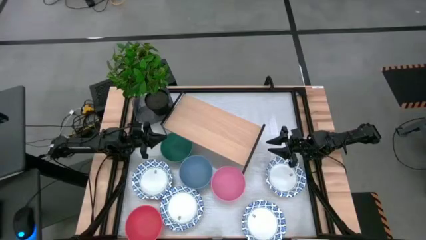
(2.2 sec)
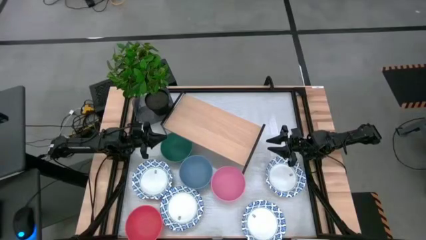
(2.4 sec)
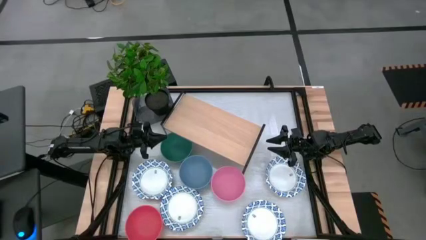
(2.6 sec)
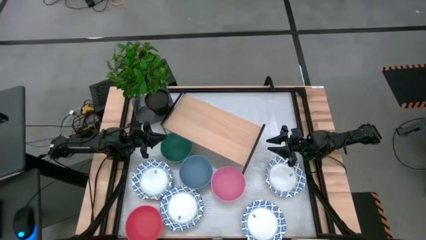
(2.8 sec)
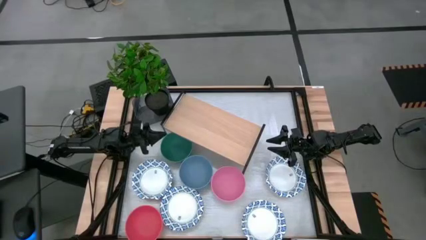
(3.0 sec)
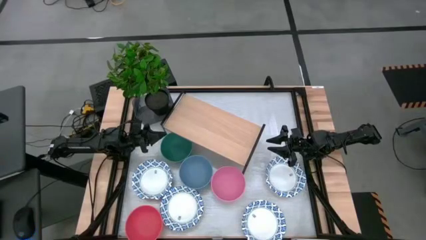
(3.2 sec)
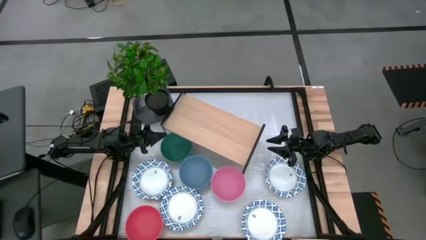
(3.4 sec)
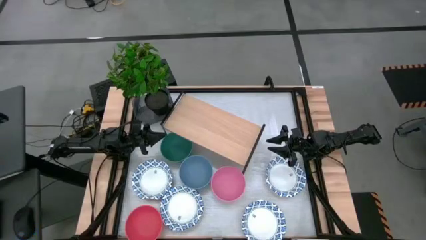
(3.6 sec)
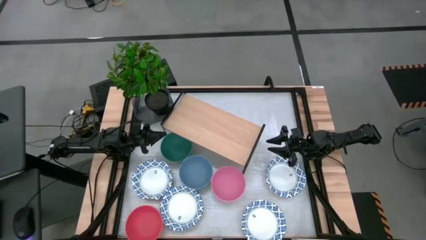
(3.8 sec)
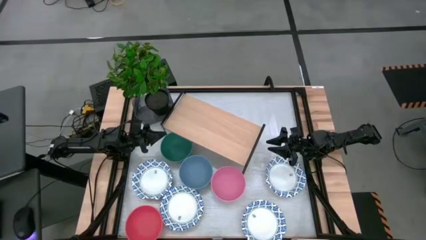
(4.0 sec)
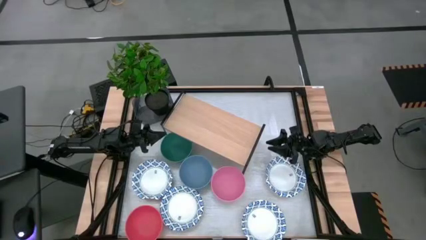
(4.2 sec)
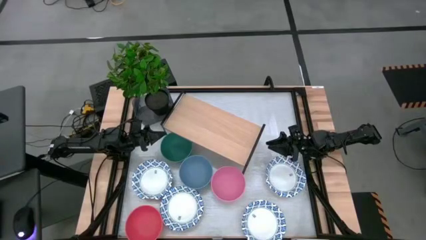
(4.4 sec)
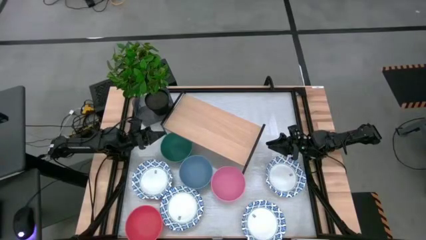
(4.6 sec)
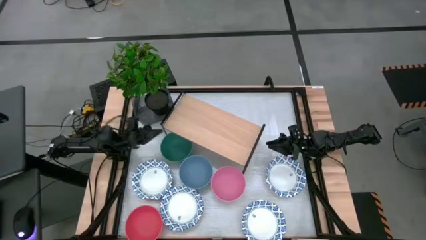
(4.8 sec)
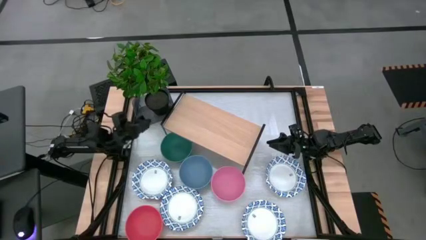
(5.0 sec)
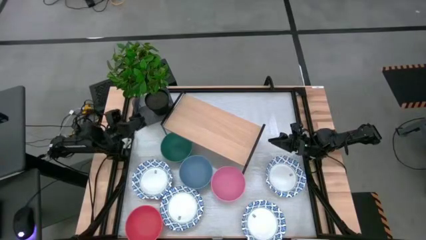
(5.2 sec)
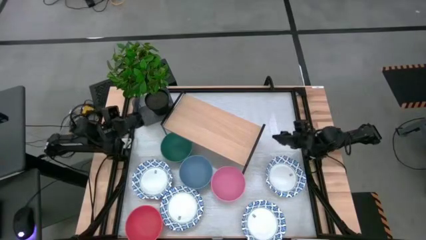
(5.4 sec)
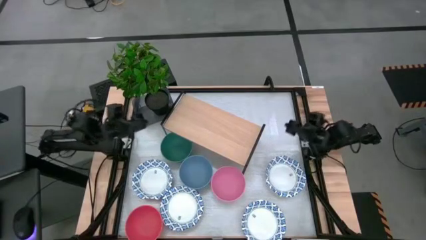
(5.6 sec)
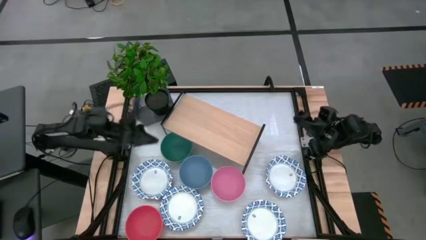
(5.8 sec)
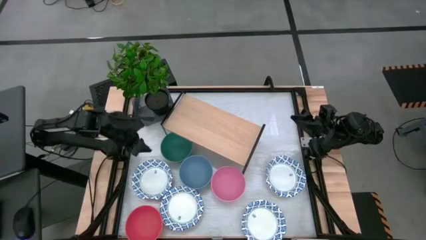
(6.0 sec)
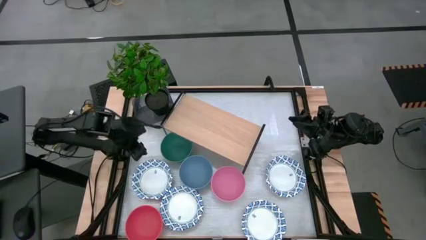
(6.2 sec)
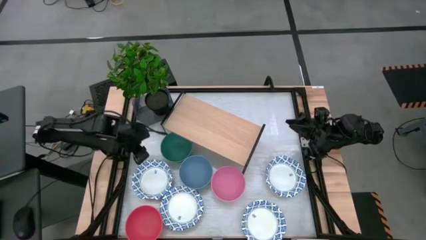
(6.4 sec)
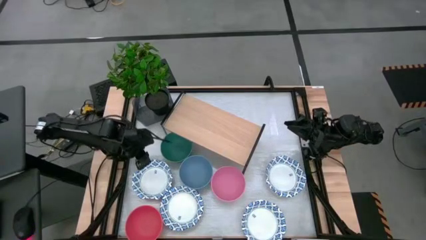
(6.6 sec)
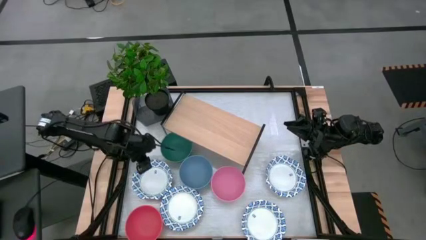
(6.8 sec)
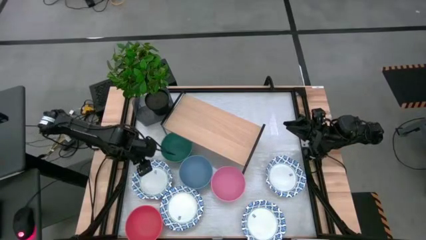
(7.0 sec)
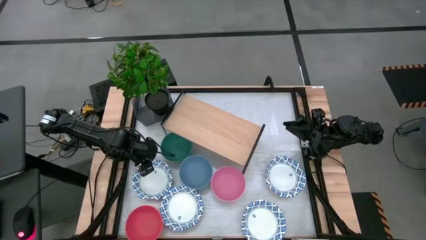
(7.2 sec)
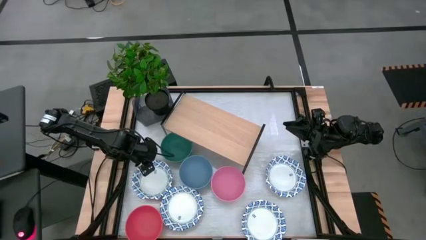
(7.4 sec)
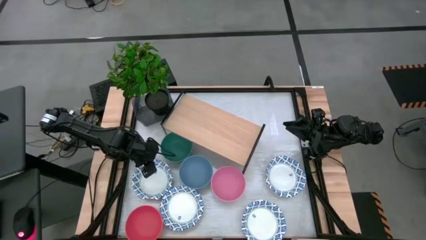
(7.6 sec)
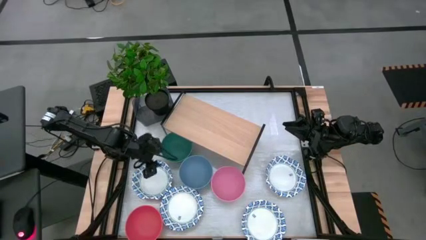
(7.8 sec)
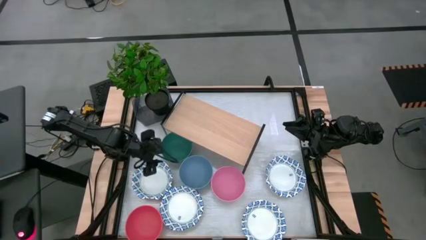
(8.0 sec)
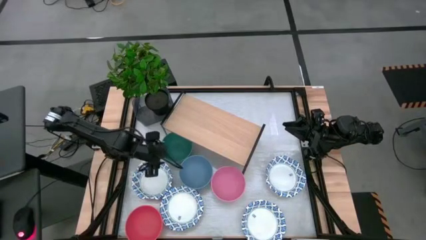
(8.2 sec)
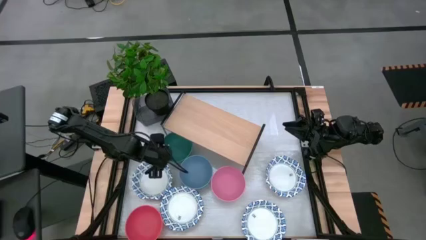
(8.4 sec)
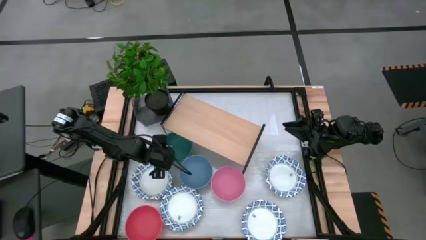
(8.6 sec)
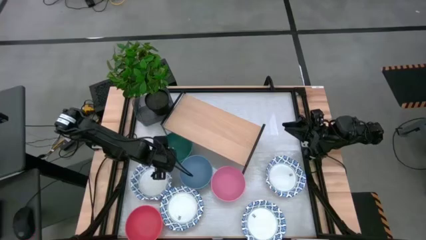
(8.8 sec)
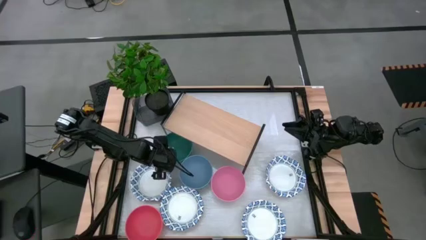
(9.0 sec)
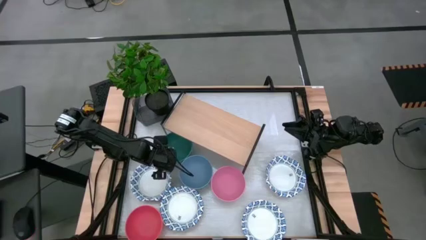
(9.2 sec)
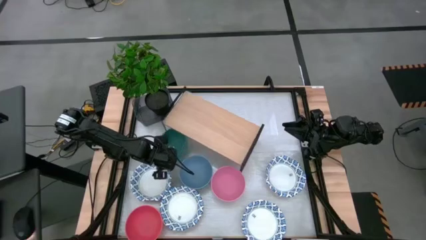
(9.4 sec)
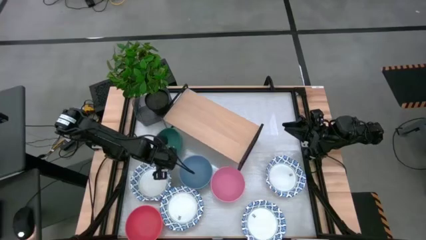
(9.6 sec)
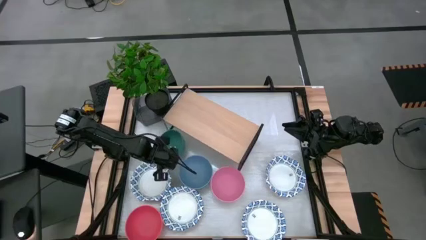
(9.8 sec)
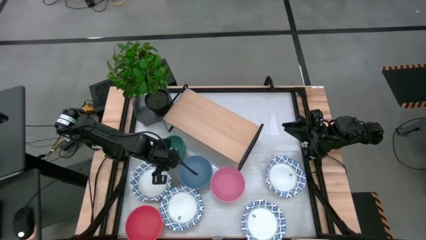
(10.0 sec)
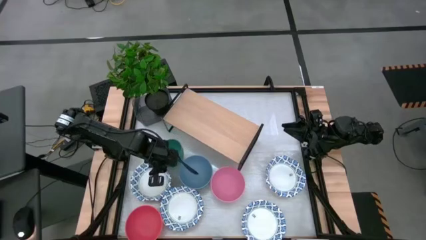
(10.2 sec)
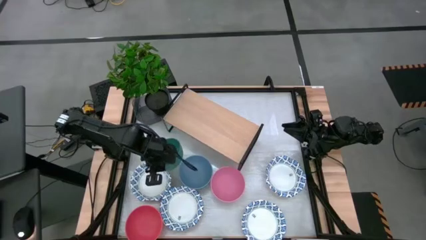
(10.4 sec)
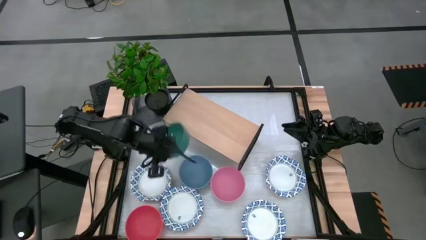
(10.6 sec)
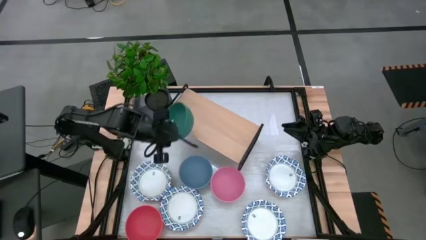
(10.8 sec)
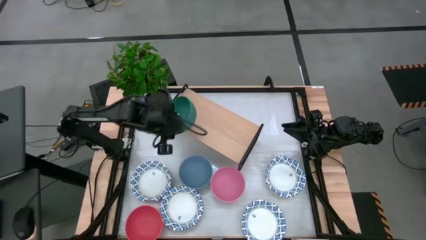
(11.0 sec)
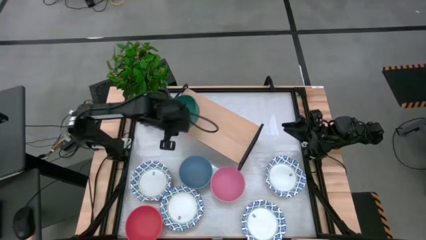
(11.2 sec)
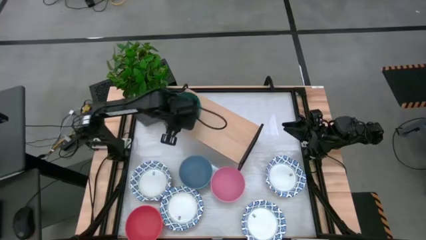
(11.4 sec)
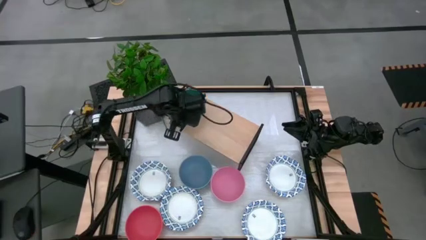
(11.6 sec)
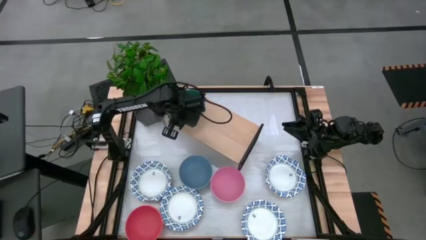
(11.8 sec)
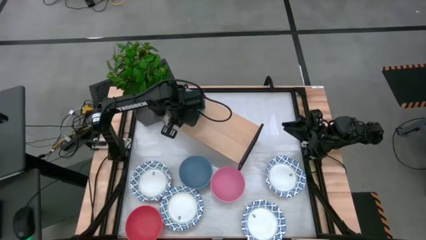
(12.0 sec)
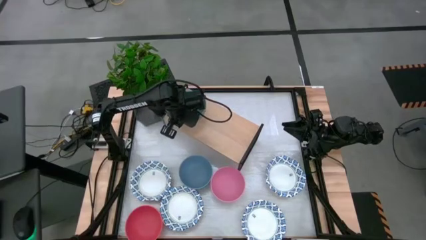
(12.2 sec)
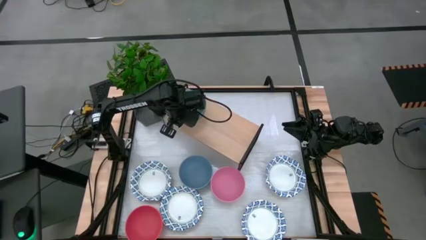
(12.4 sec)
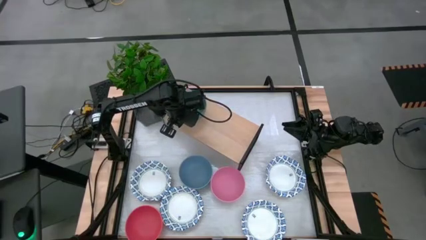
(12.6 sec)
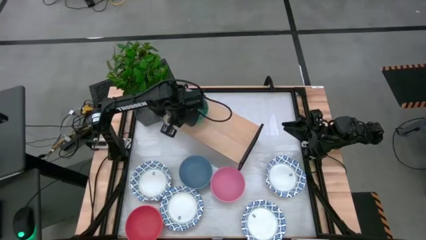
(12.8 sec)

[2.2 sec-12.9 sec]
Task: Place and stack bowls onto a shelf
Put the green bowl on the shelf

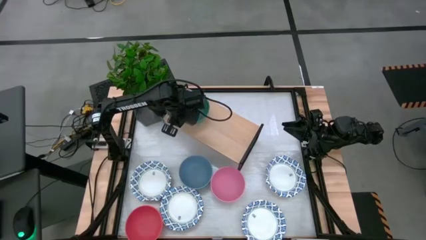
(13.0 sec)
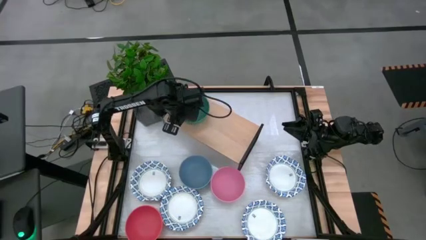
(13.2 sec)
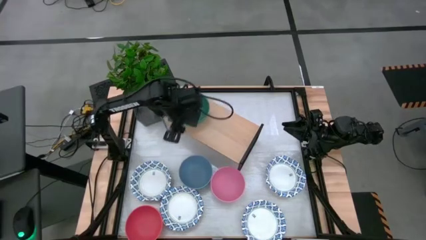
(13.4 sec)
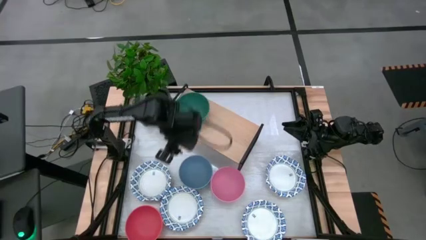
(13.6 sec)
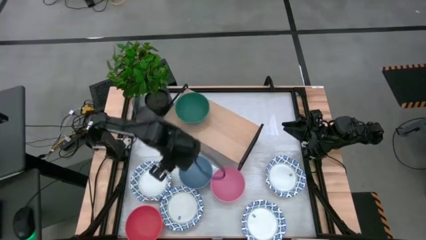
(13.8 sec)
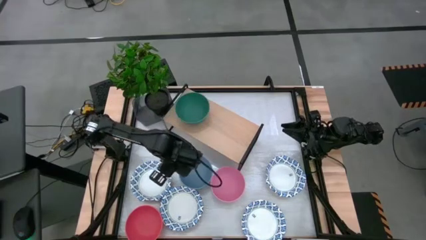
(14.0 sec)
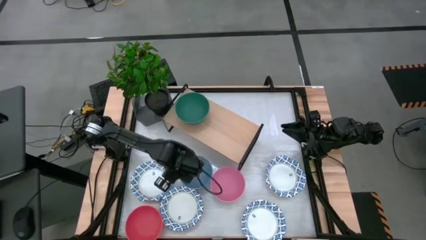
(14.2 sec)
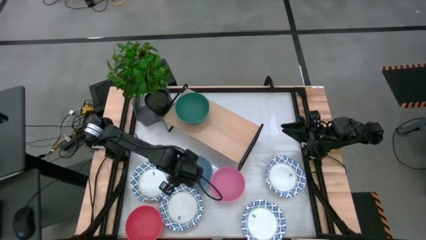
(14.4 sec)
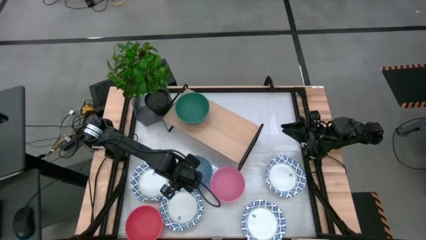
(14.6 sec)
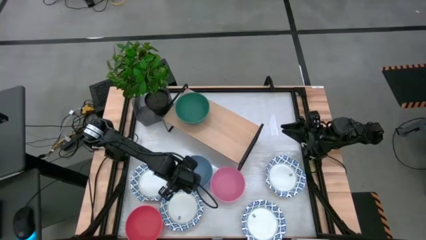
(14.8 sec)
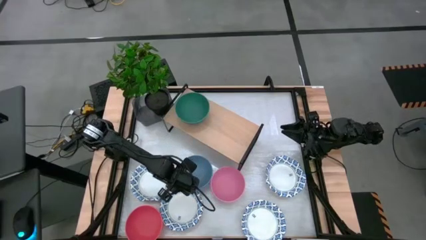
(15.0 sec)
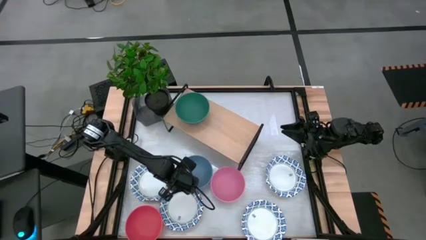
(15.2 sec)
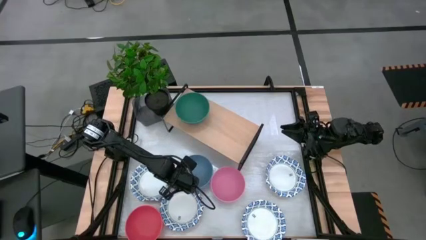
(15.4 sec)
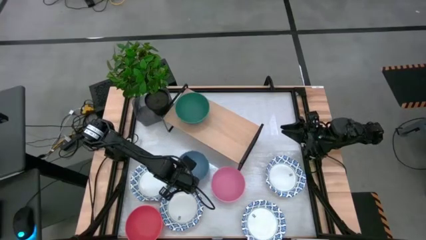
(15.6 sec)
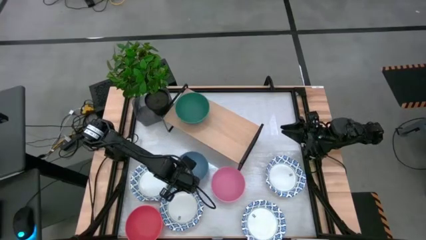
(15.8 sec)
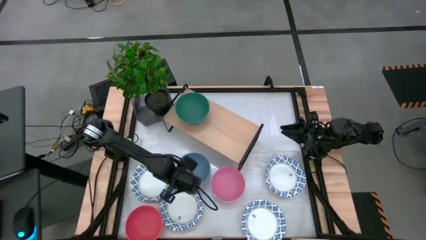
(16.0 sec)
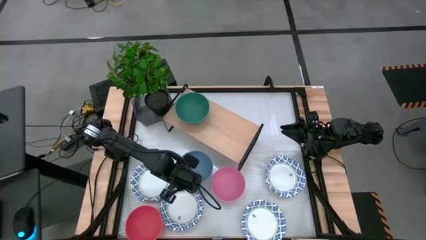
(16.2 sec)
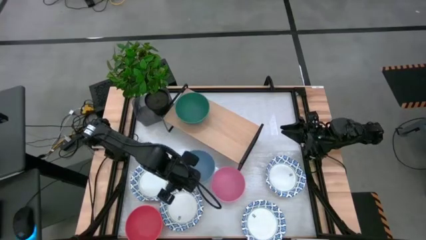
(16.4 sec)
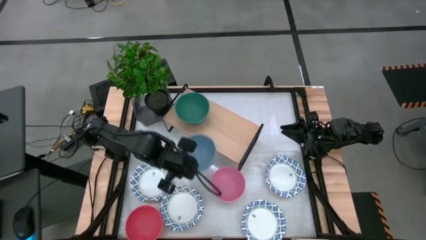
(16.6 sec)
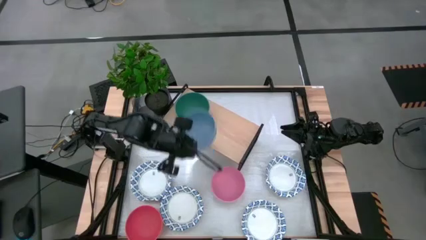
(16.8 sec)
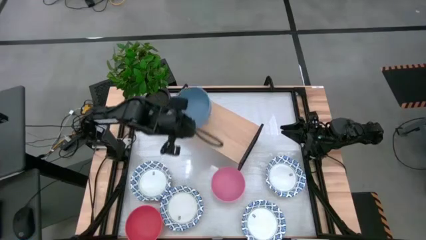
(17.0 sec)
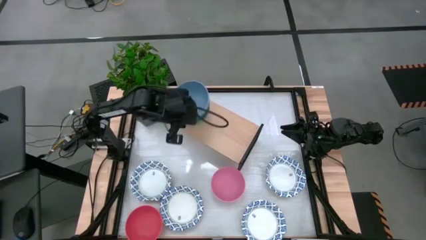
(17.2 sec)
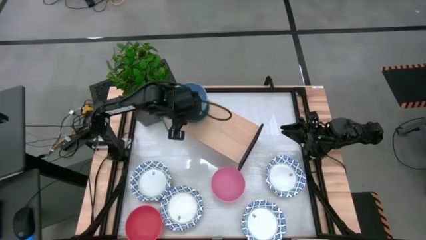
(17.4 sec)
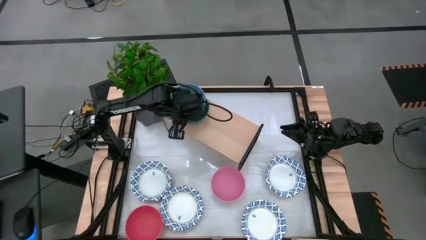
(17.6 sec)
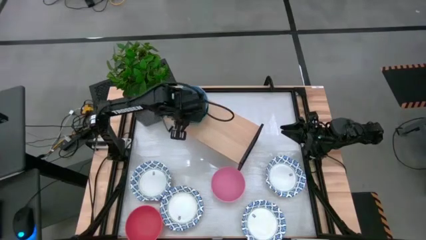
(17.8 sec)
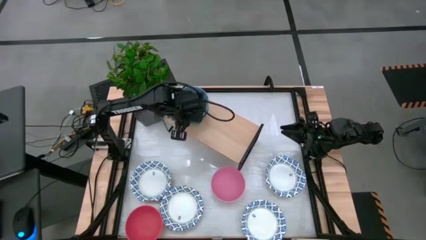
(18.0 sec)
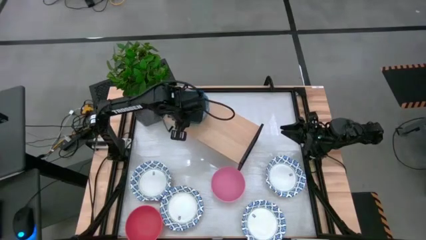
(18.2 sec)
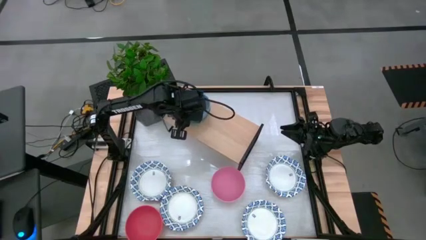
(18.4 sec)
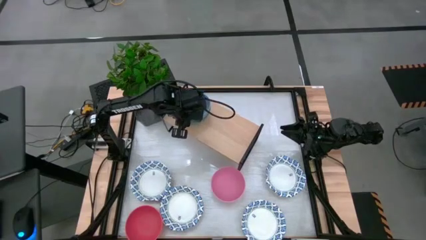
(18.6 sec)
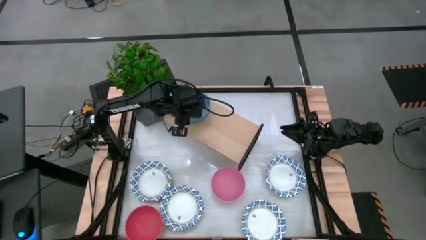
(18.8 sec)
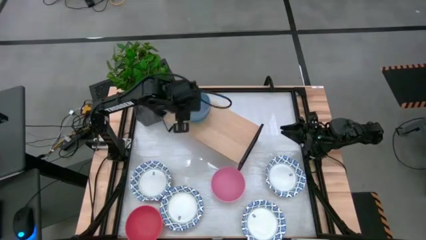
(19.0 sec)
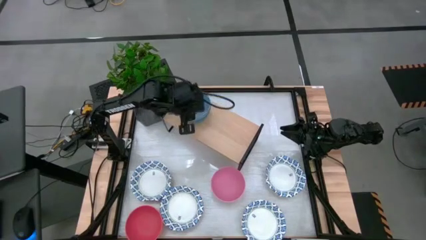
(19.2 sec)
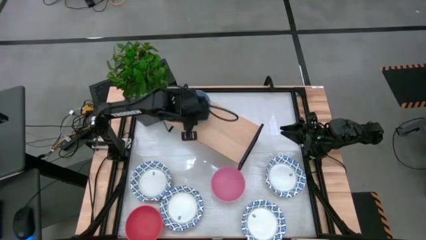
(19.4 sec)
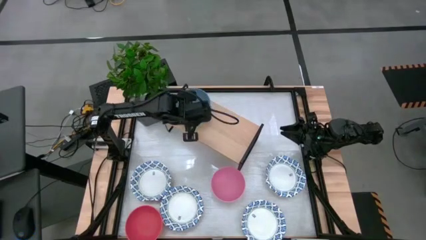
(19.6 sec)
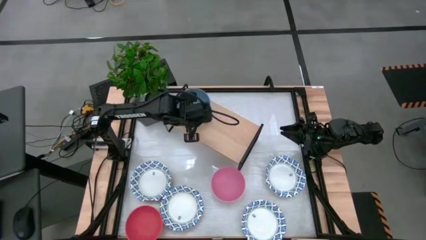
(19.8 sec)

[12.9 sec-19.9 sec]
Stack the blue bowl on top of the green bowl on the shelf
